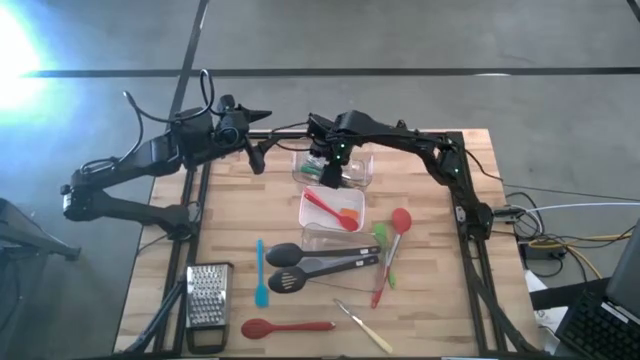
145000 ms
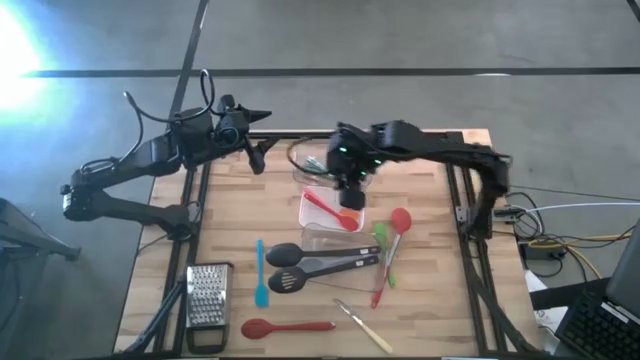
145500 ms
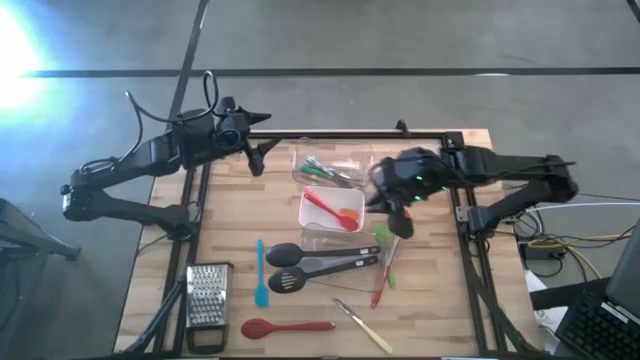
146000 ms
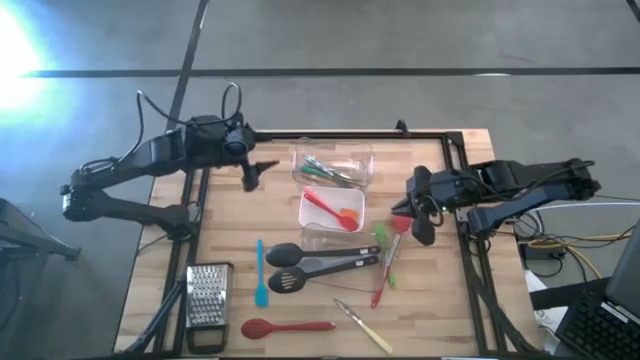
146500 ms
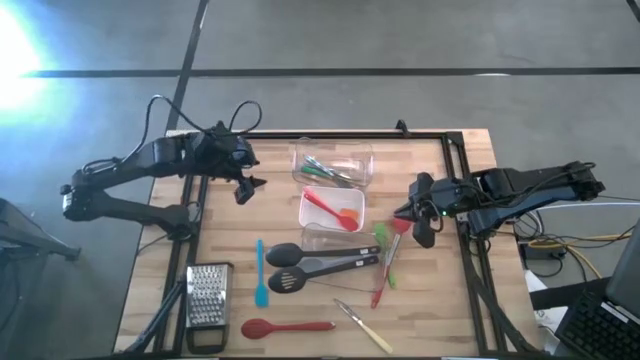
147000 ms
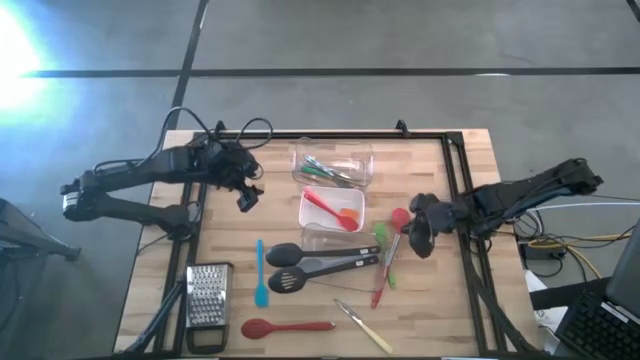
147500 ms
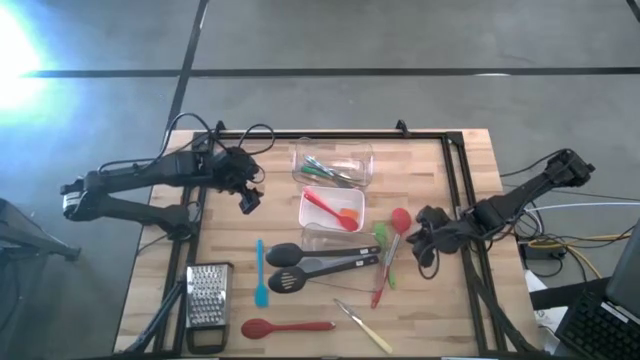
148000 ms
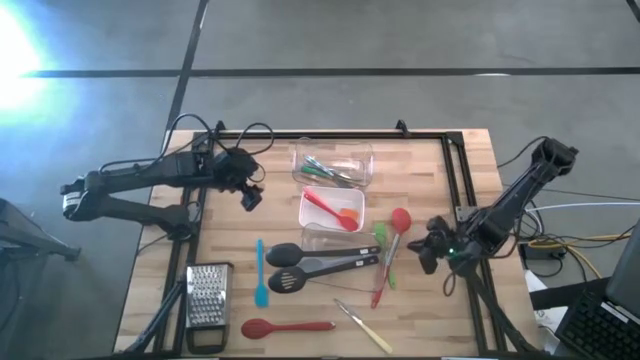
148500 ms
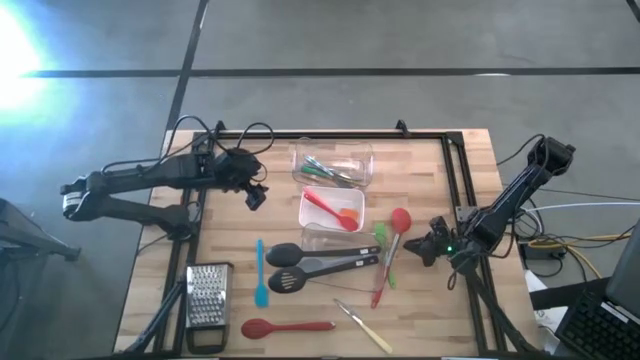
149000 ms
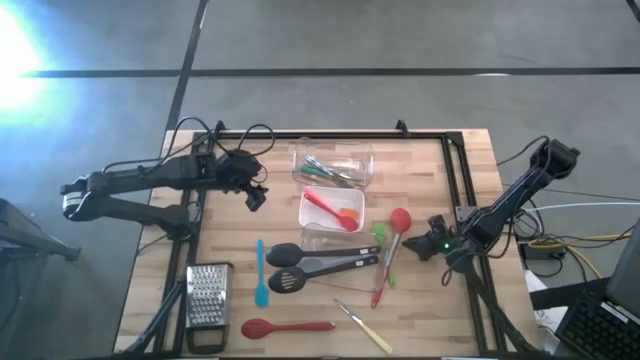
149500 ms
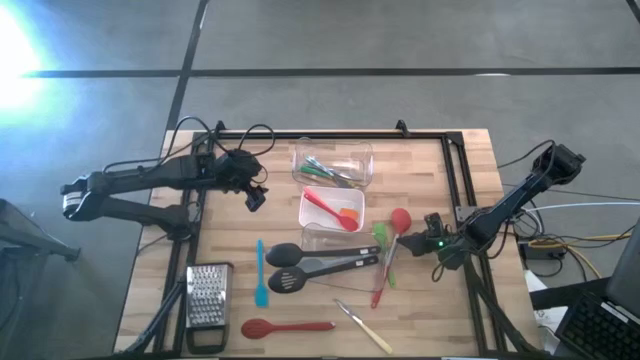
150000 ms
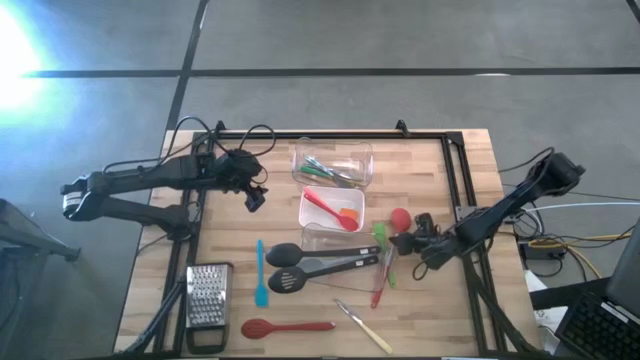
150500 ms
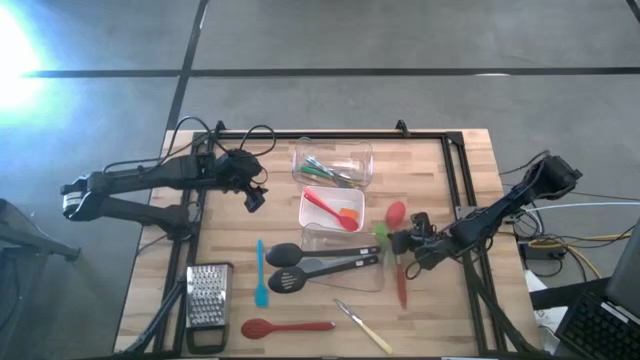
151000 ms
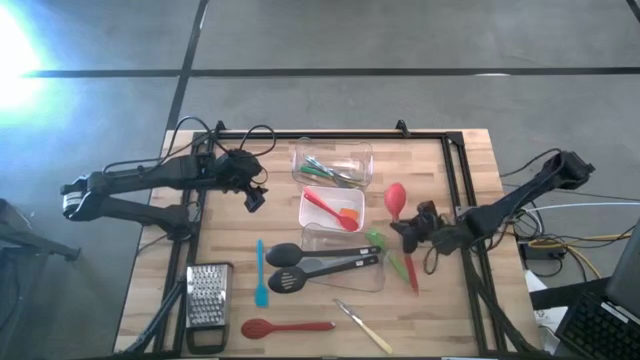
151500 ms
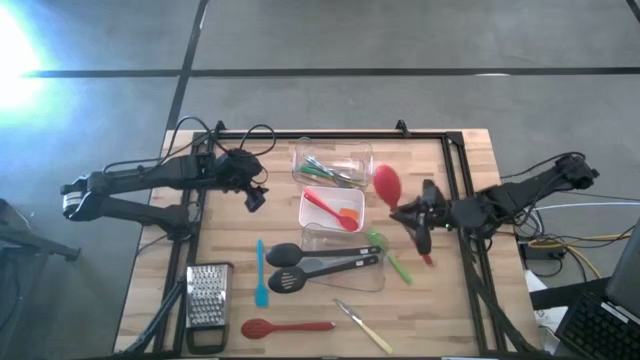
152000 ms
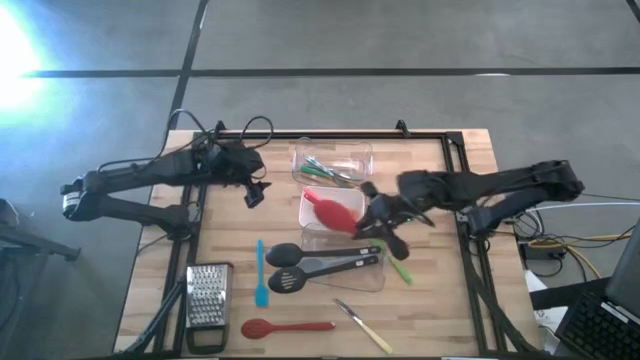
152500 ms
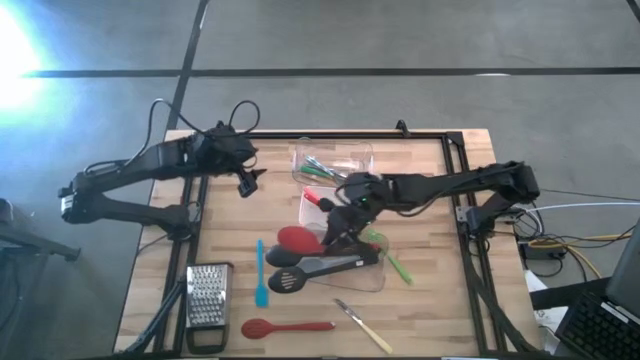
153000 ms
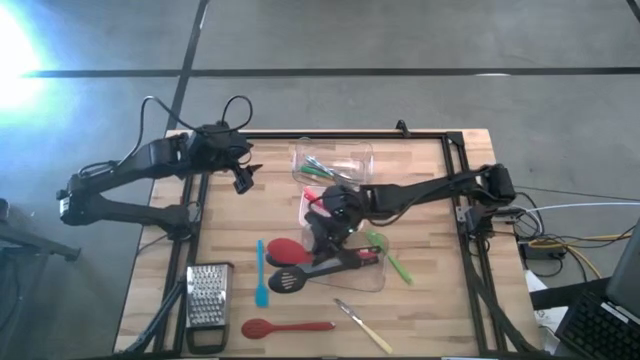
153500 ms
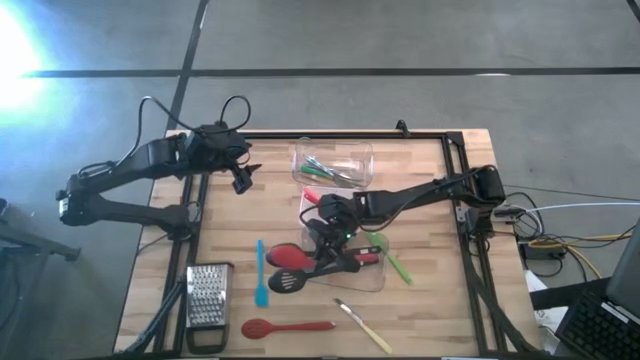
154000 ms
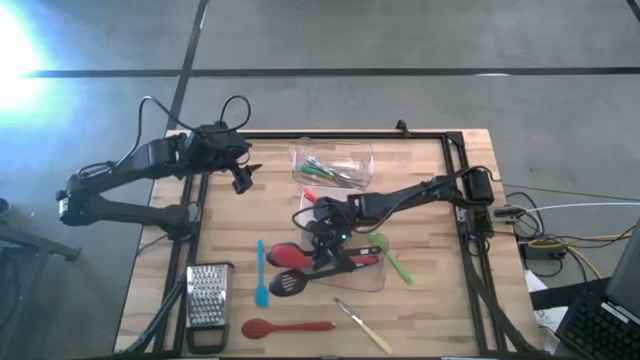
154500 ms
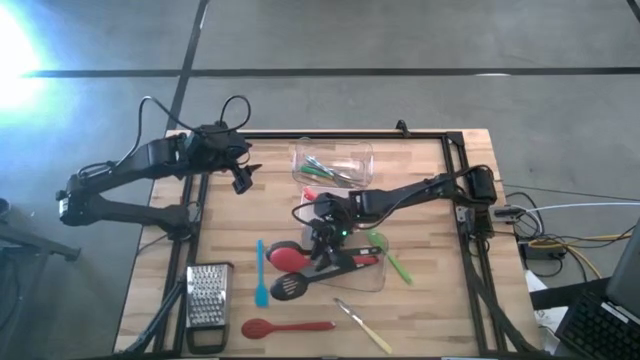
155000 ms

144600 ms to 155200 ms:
Task: Pick & Place Kitchen Items
Put the red serving spoon into the bottom transparent bin

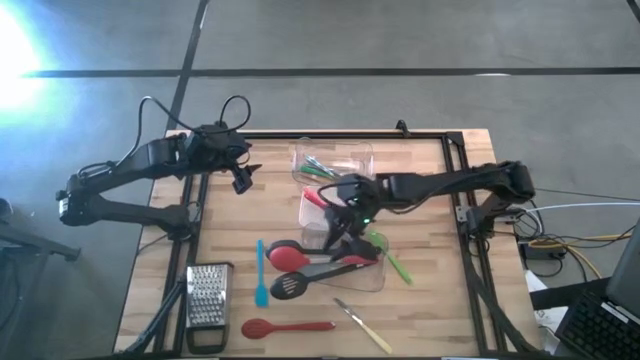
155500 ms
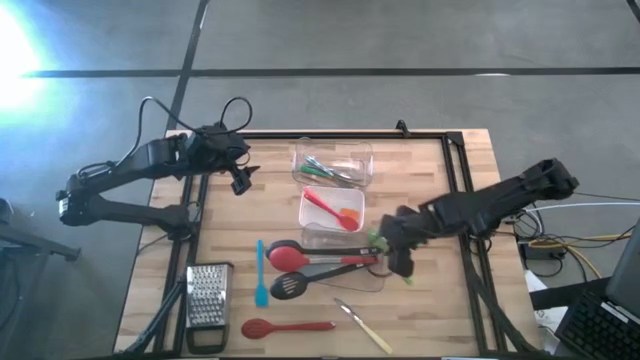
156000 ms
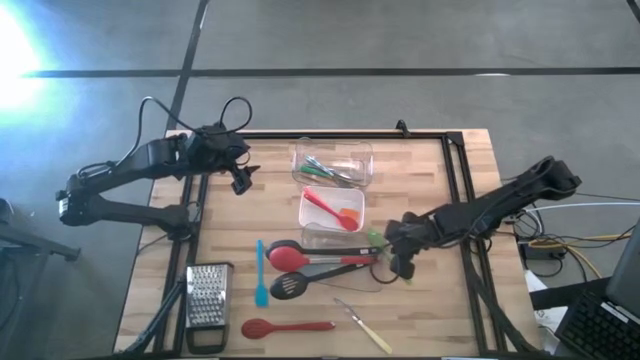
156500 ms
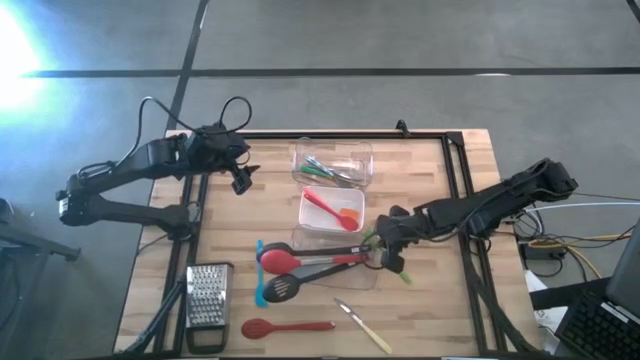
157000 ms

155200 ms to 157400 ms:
Adjust the bottom transparent bin

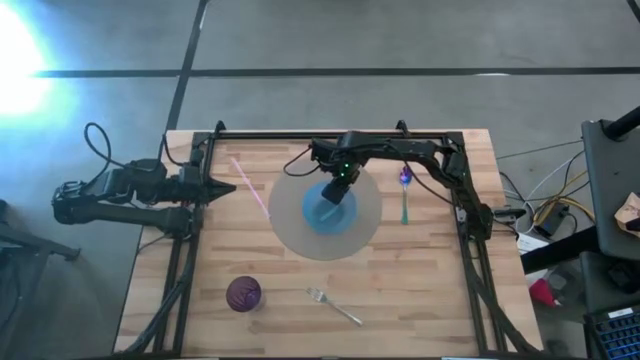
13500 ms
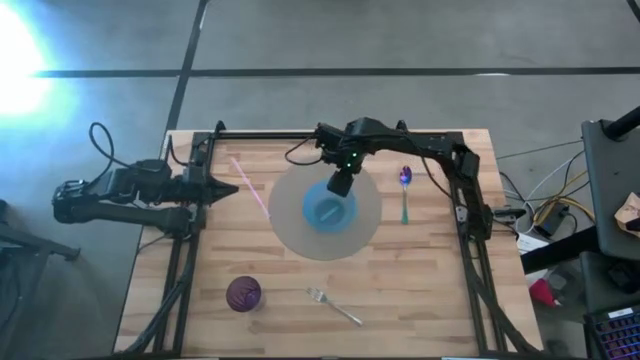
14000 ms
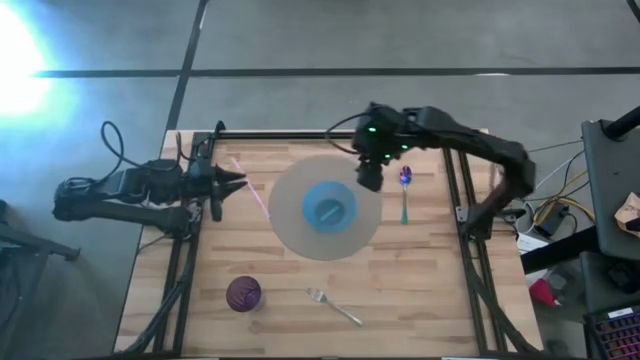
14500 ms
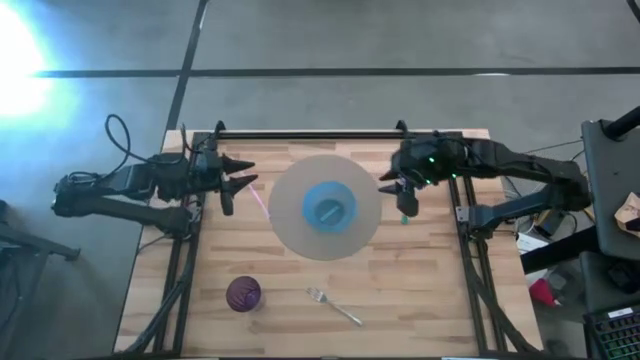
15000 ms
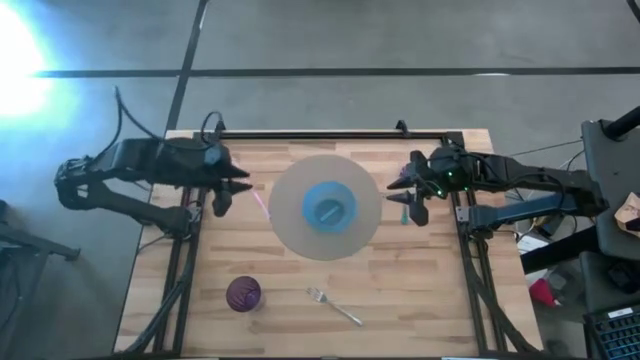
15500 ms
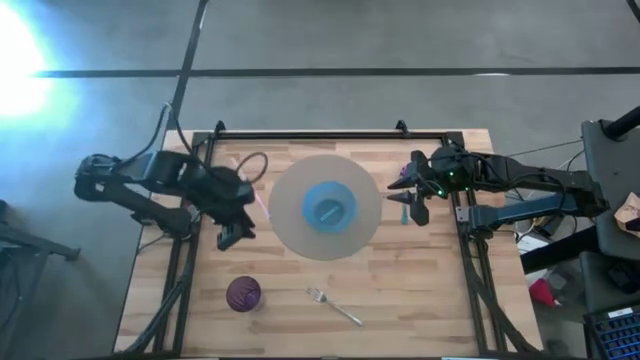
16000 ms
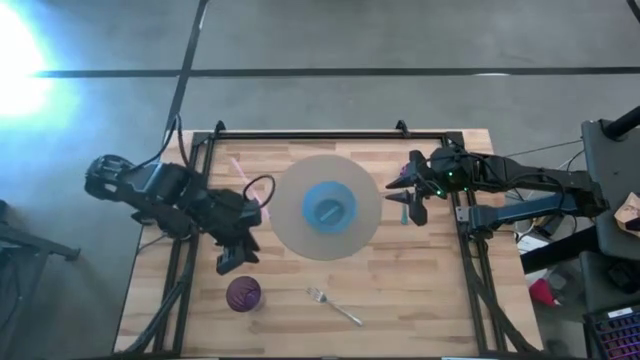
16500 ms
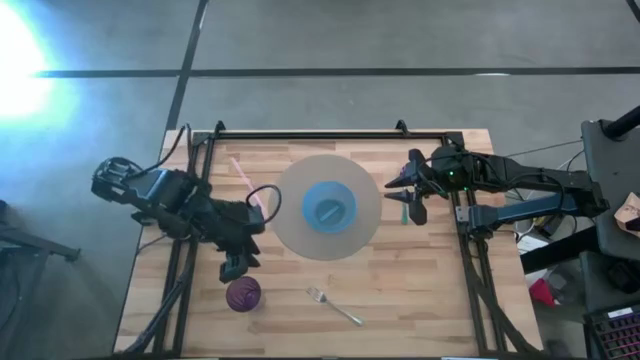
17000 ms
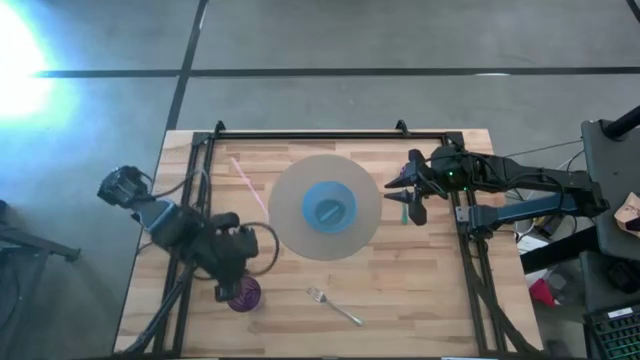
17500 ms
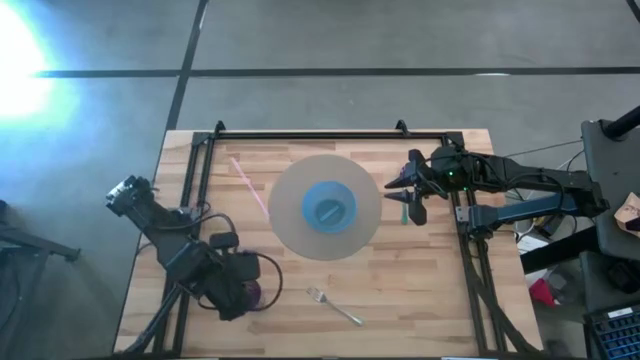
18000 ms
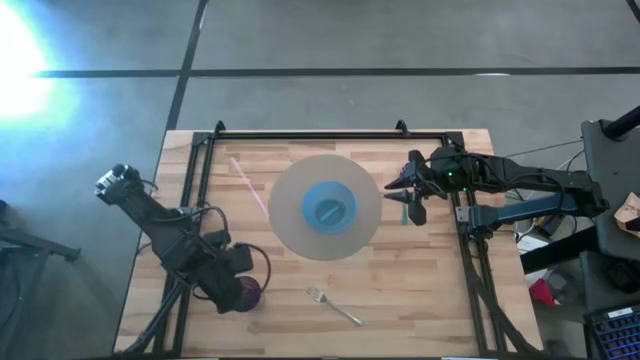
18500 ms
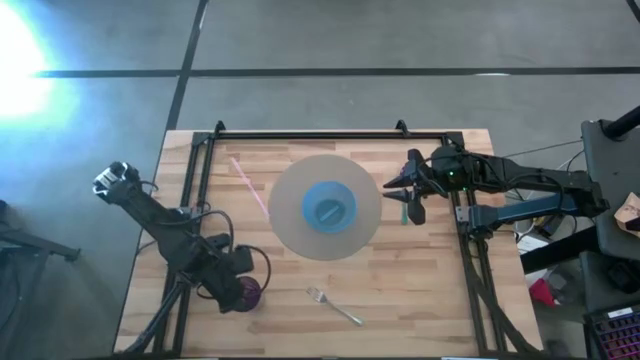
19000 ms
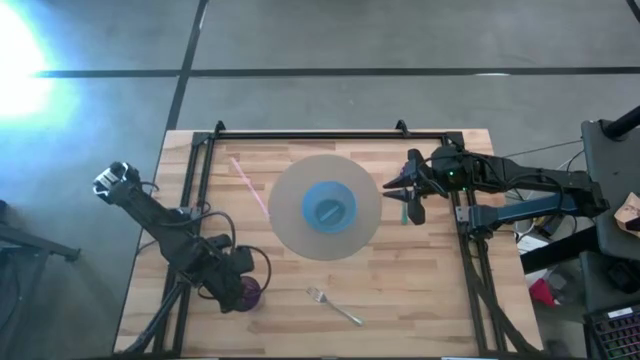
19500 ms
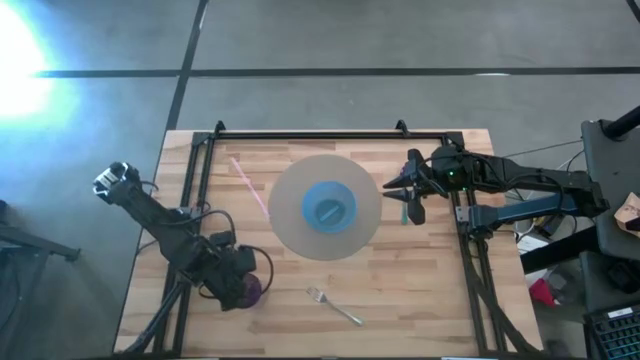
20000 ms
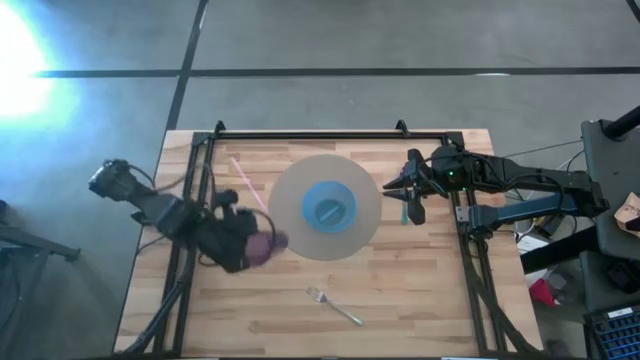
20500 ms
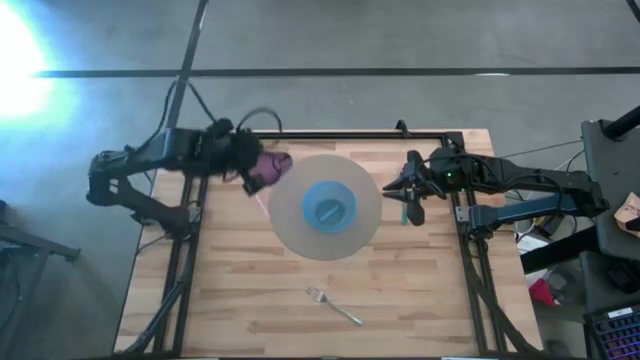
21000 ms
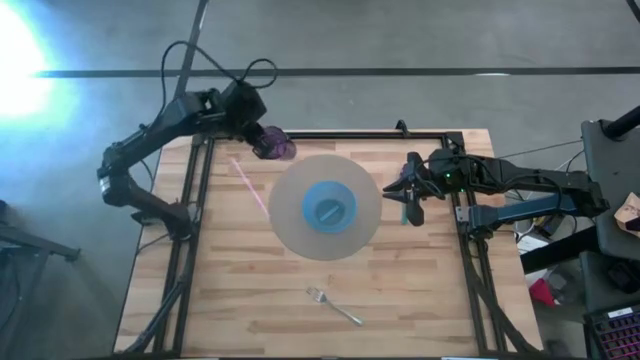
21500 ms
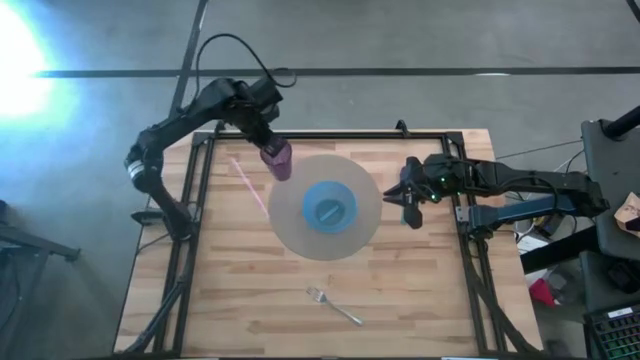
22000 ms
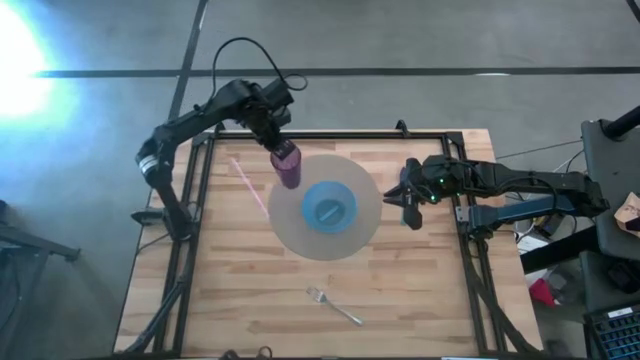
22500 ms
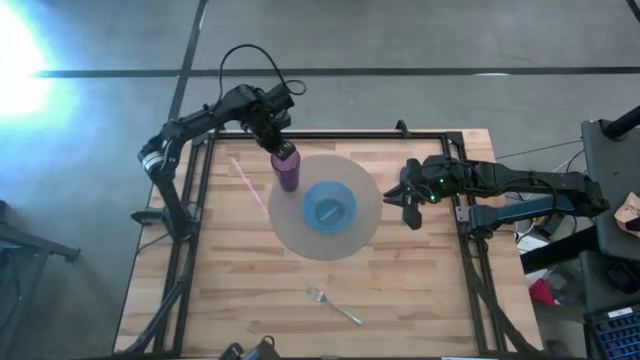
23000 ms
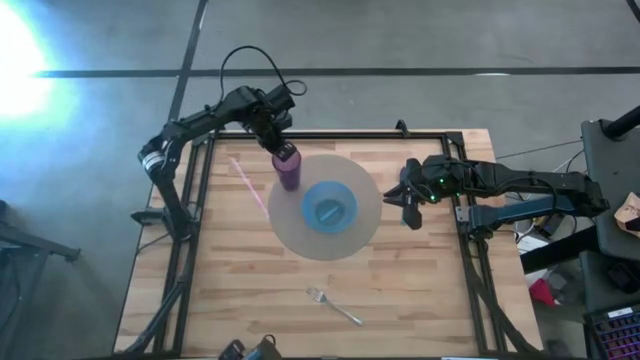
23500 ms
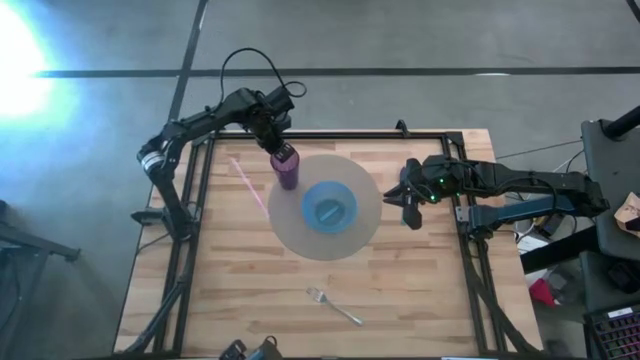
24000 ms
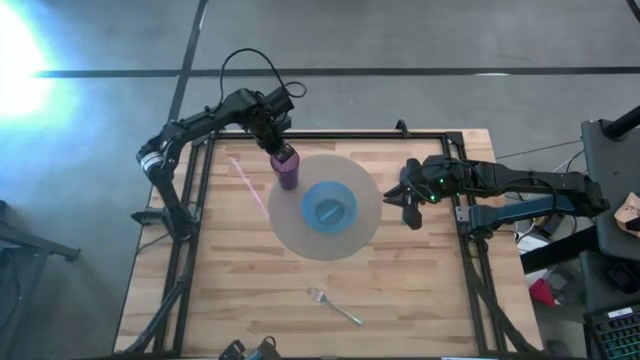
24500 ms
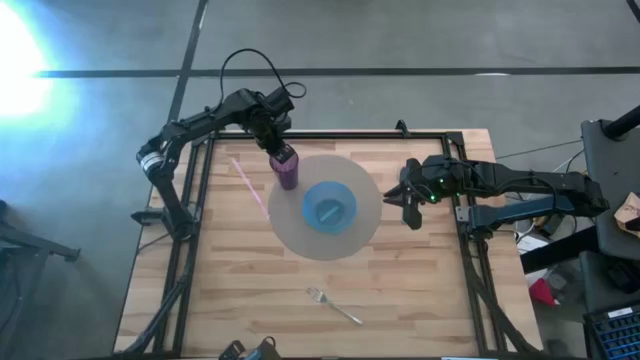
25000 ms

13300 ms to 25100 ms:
Task: Pick & Place Utensil
Put the violet cup on the gray mat to the top left of the blue bowl
